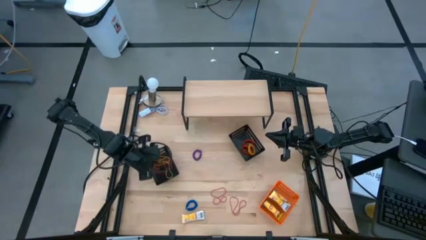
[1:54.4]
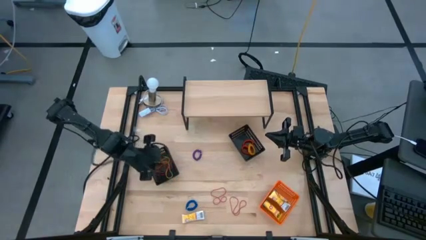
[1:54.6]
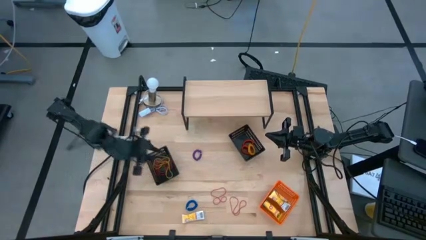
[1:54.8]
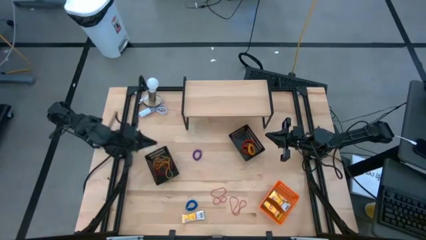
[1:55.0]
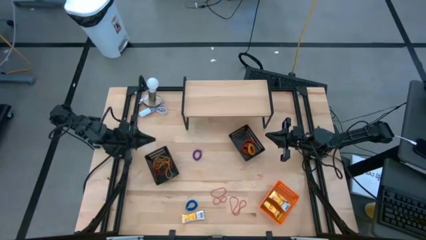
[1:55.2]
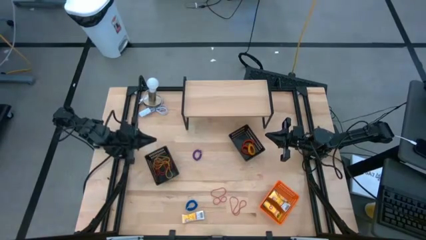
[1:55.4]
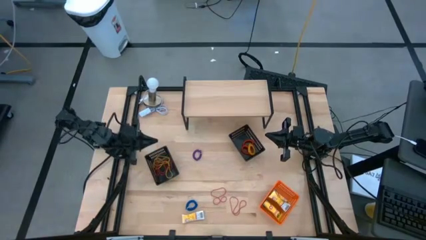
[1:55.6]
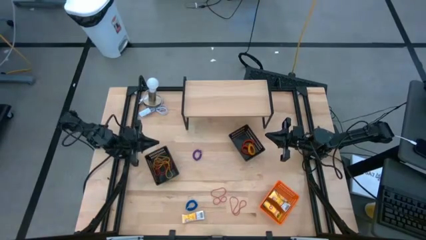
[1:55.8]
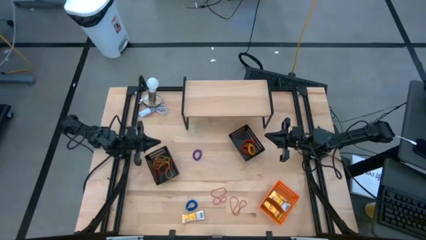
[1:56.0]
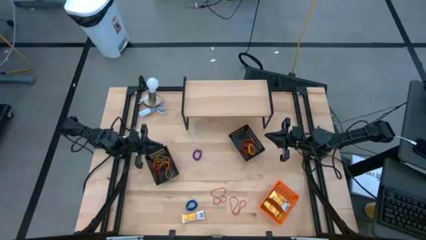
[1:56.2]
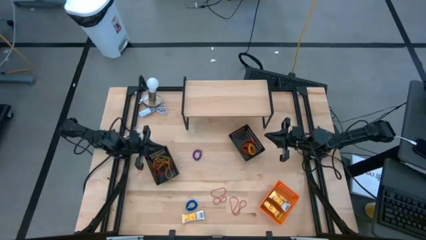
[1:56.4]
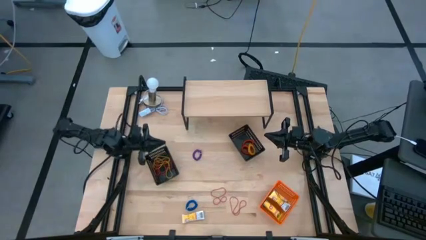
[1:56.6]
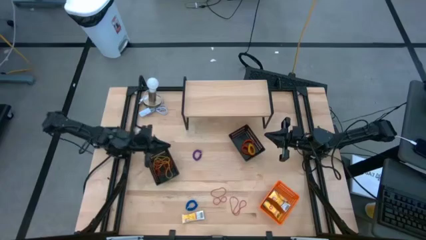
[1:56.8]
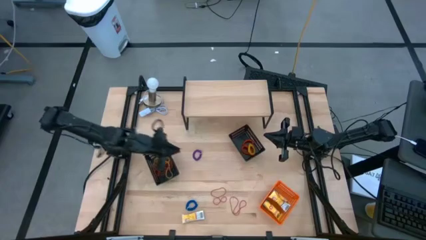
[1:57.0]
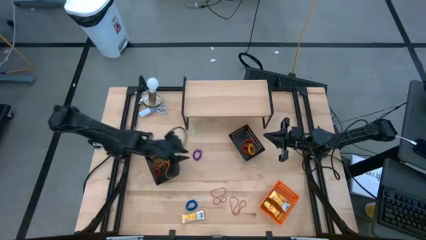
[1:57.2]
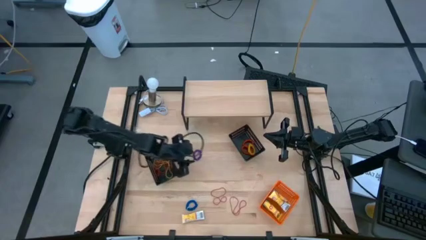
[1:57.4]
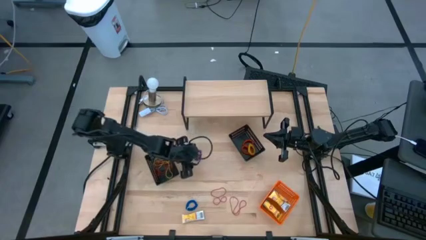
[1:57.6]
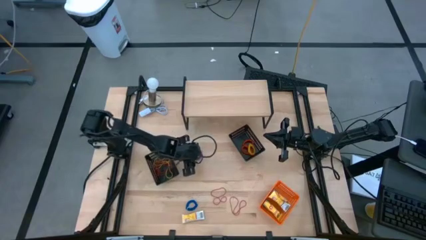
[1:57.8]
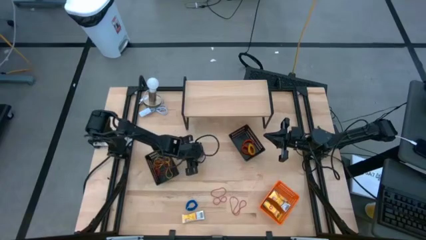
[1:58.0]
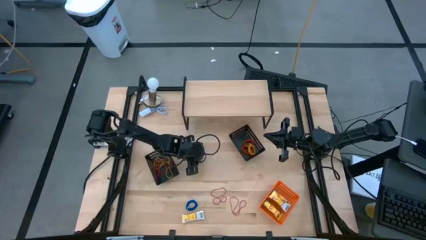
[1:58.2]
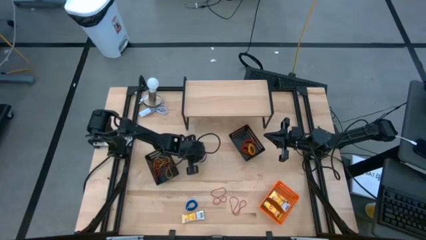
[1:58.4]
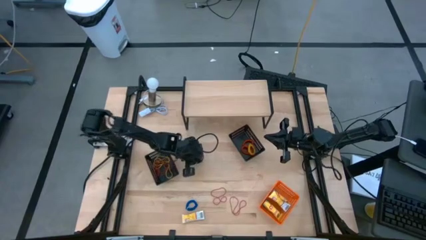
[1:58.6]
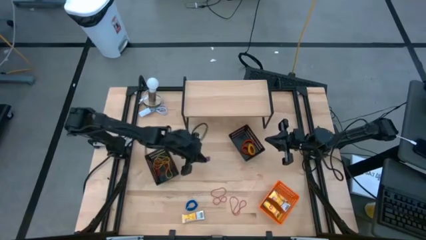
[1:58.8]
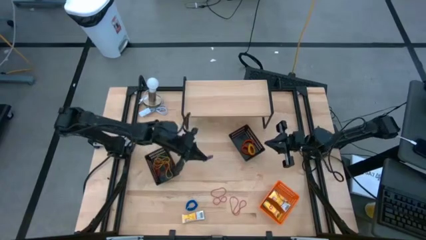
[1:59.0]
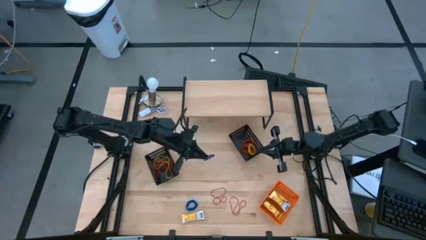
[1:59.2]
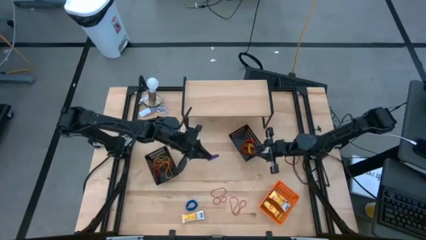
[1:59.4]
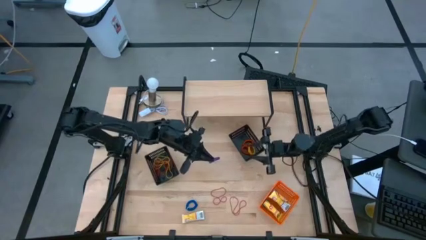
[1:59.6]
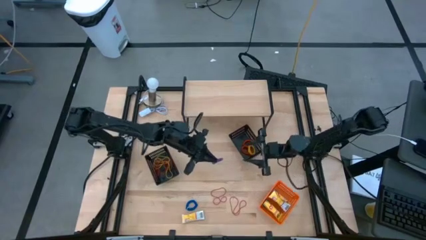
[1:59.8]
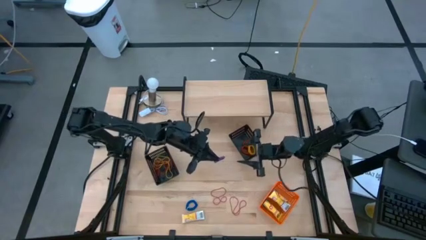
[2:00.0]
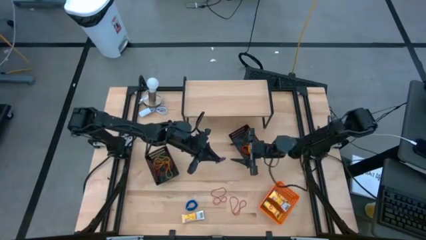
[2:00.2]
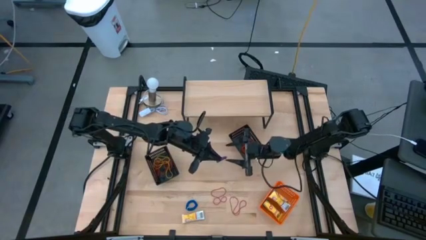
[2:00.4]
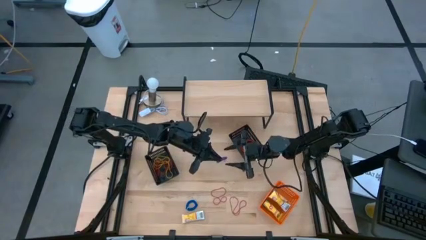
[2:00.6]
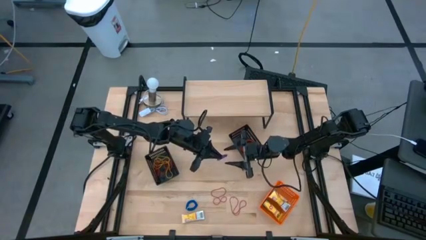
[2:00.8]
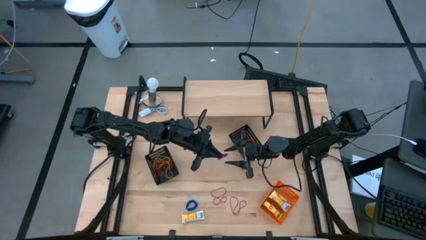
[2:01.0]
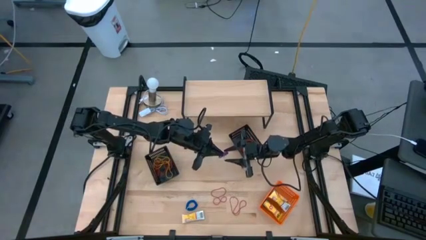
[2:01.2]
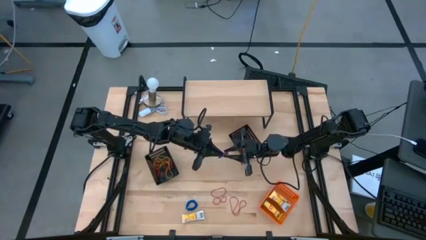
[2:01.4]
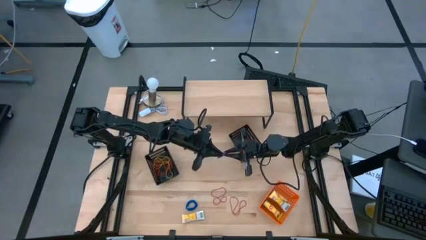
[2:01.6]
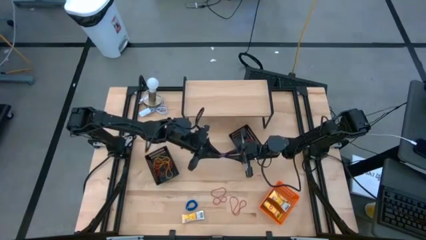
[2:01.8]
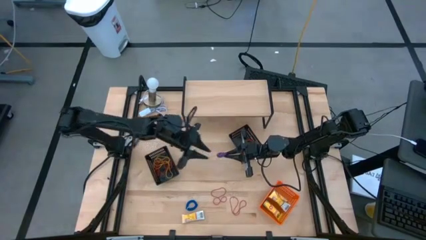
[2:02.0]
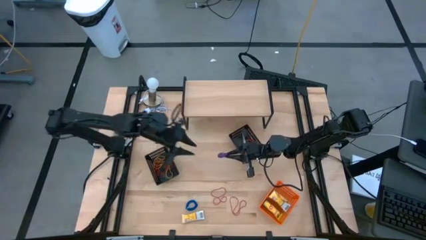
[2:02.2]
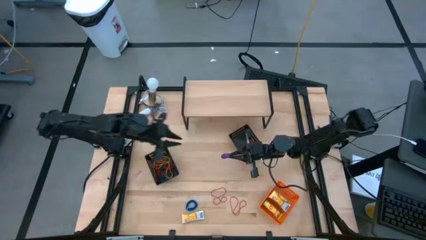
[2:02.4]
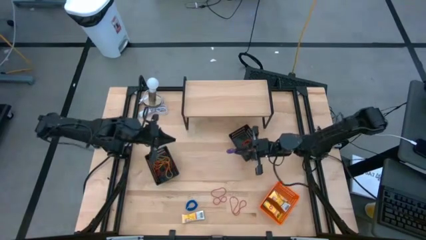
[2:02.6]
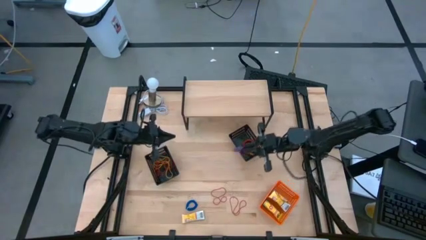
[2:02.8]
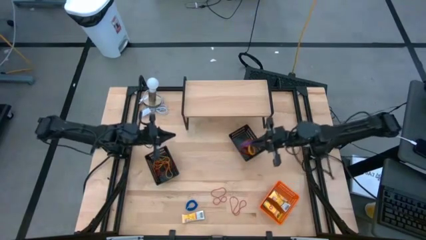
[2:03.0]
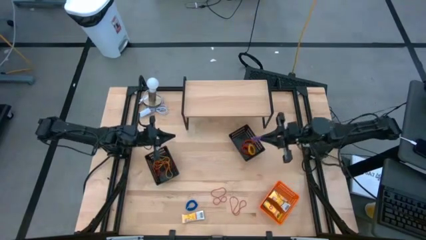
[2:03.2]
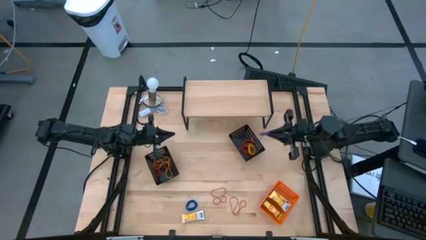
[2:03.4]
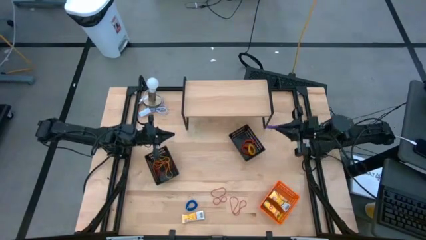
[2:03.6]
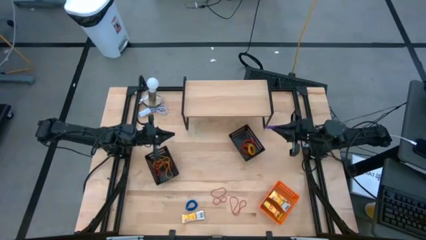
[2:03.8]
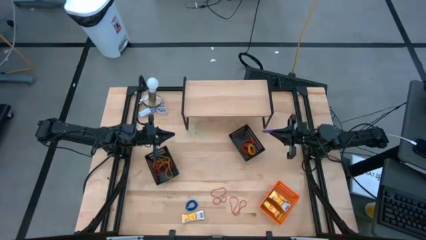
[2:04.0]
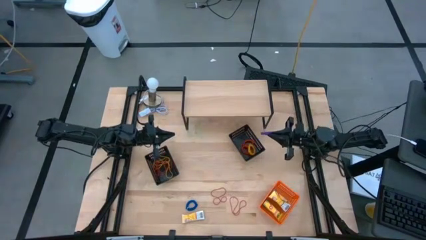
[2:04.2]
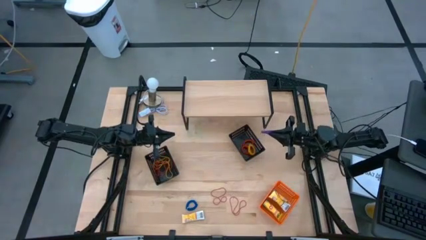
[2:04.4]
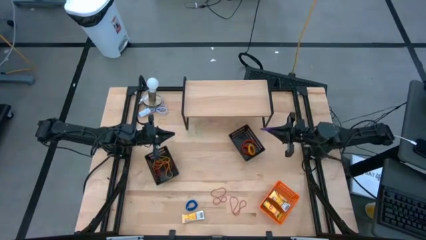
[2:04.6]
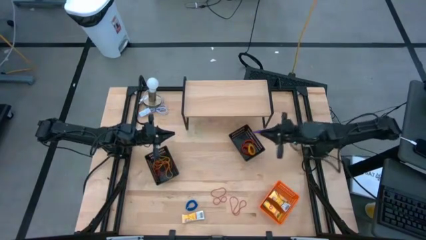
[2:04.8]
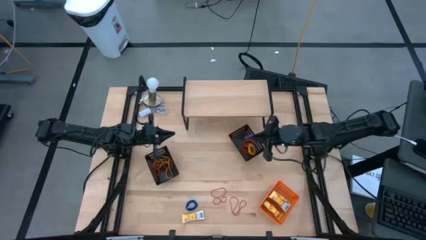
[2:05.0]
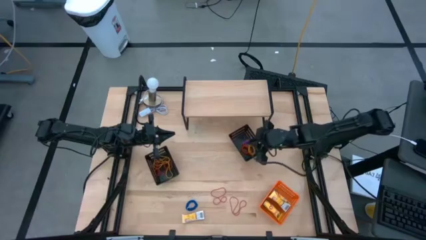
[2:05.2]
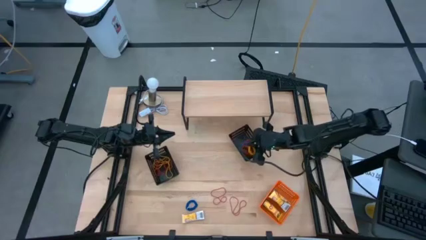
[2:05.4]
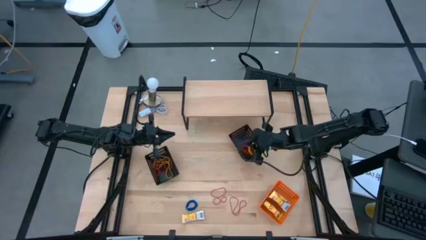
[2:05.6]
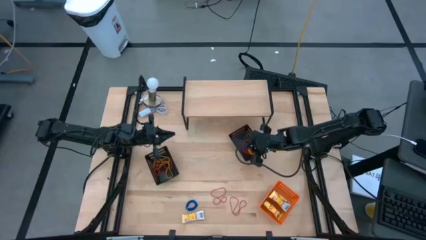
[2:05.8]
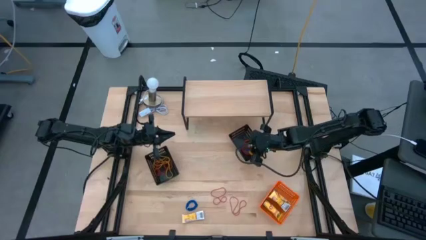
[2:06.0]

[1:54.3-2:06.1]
Task: Pick & Place Office Desk Supplies
Put the purple spring keychain into the right black bin
